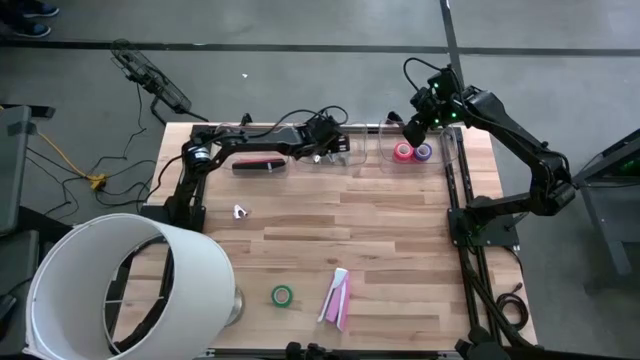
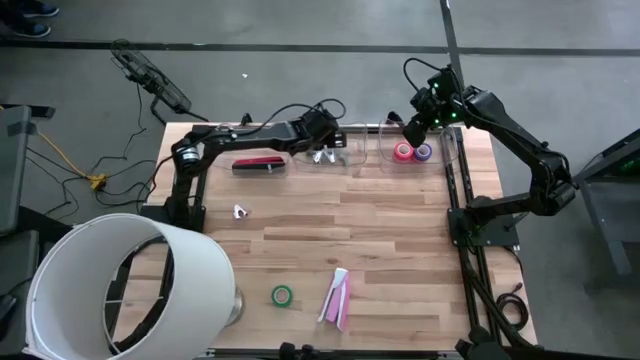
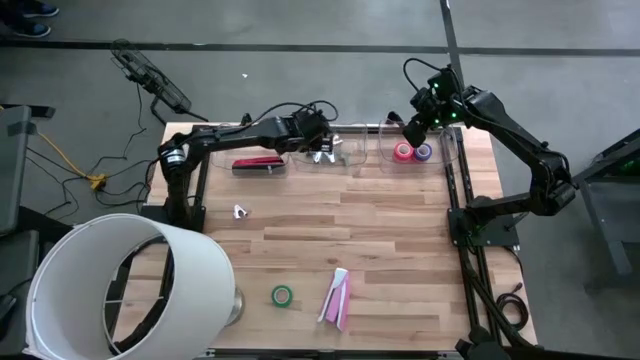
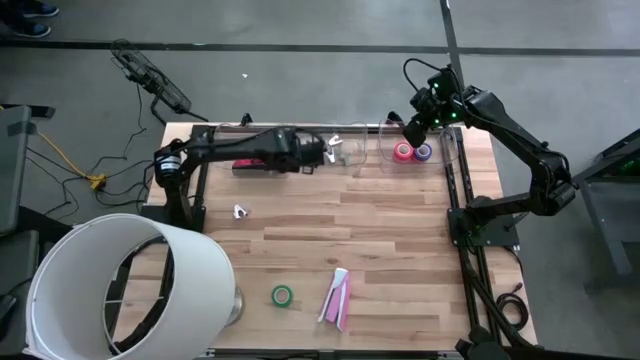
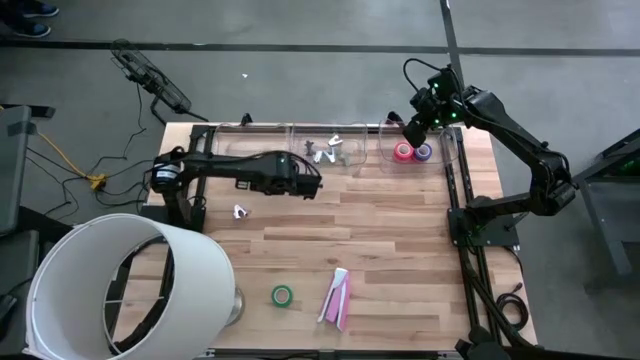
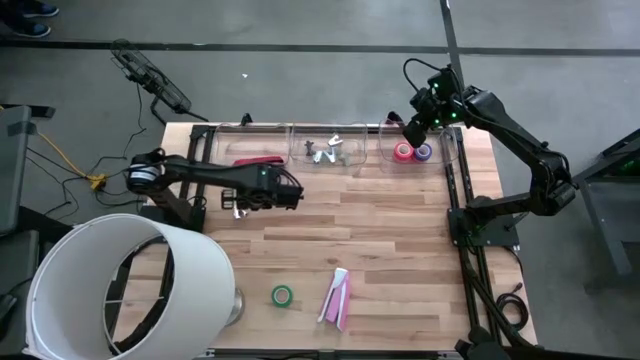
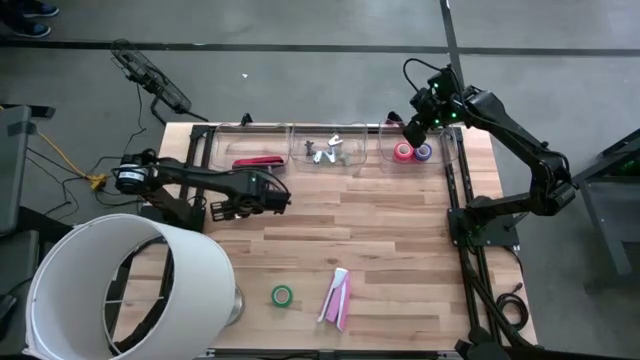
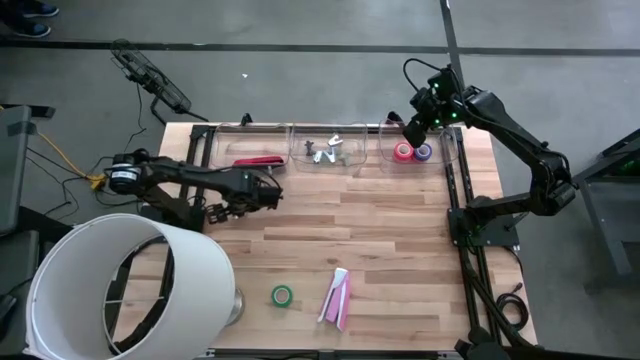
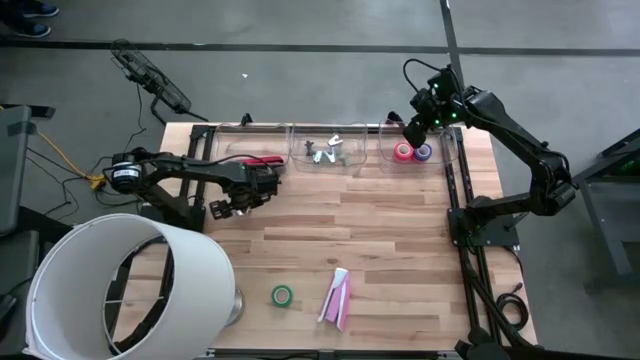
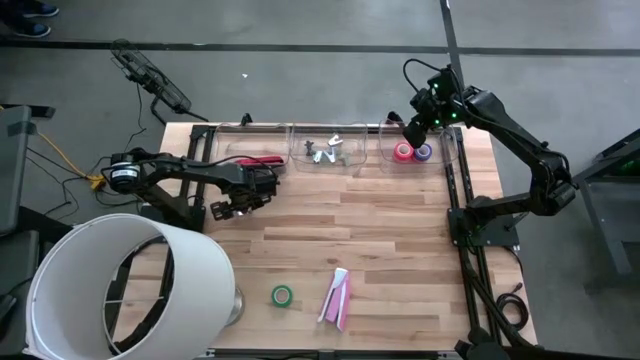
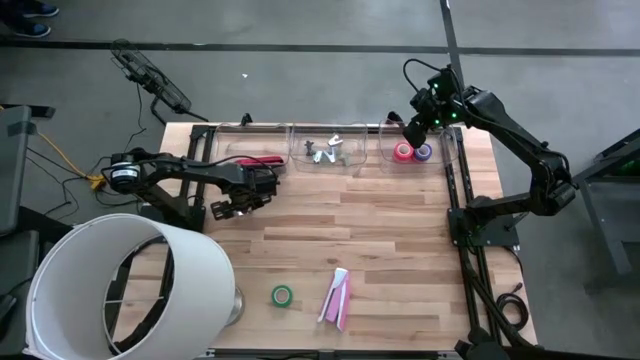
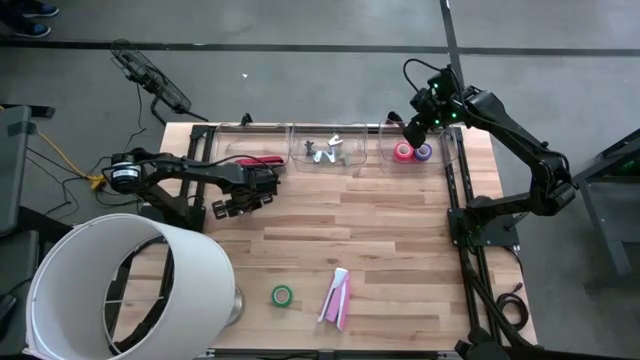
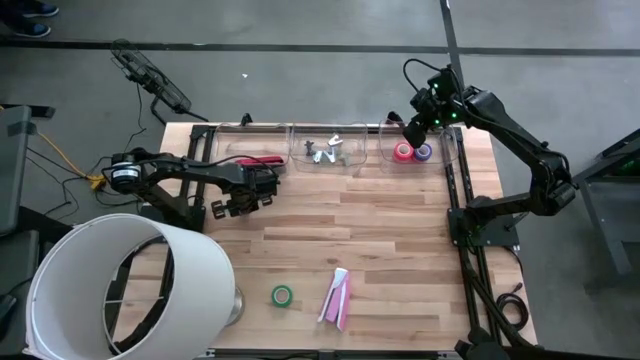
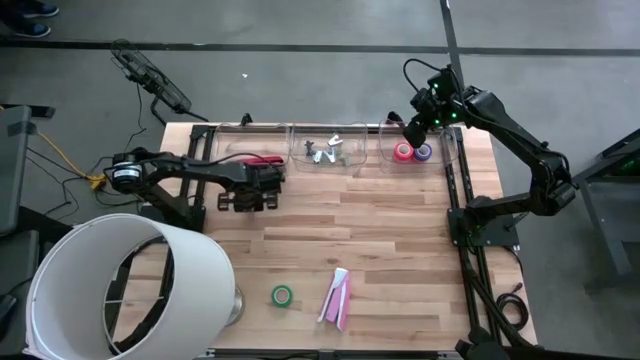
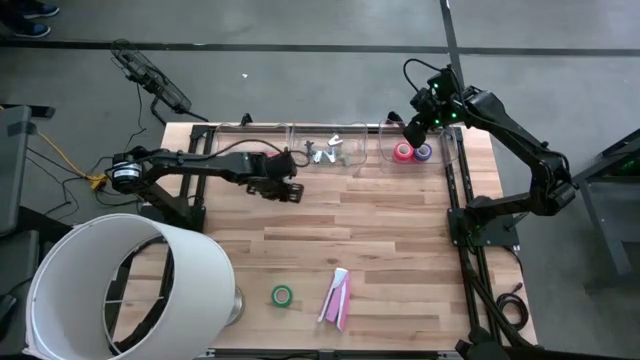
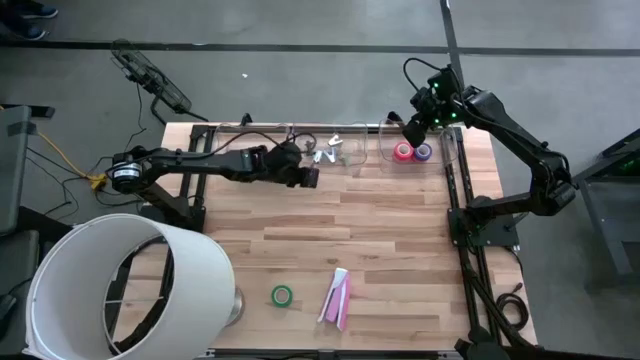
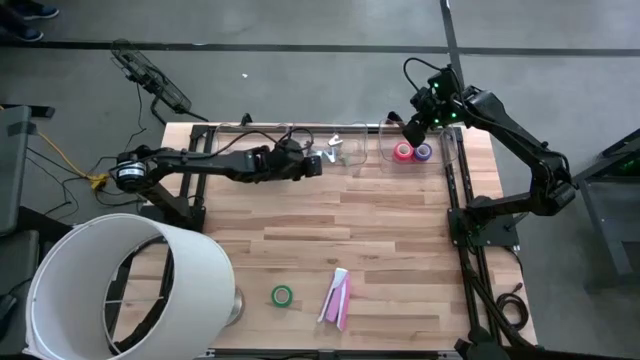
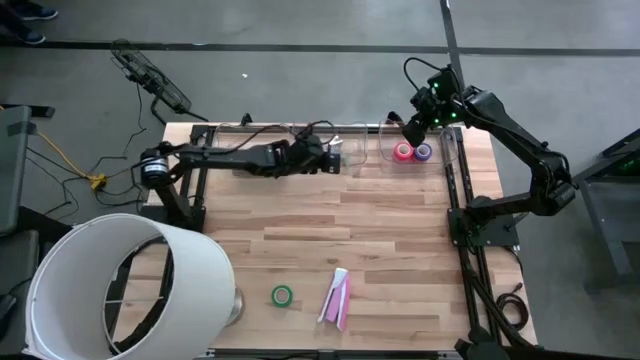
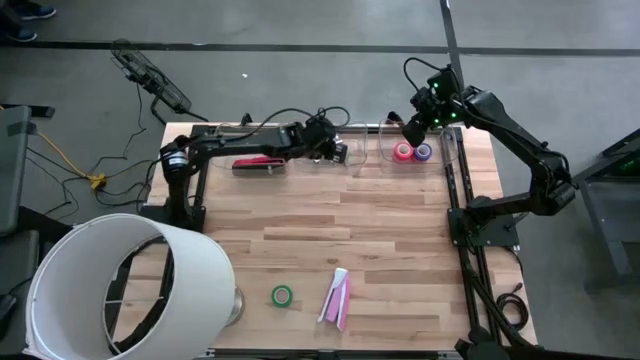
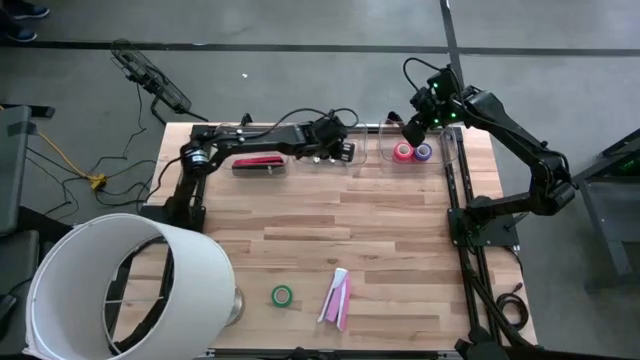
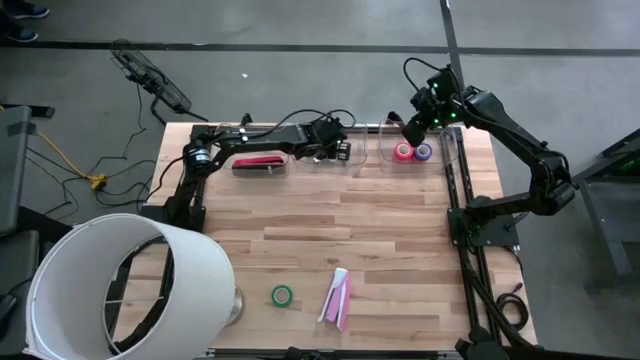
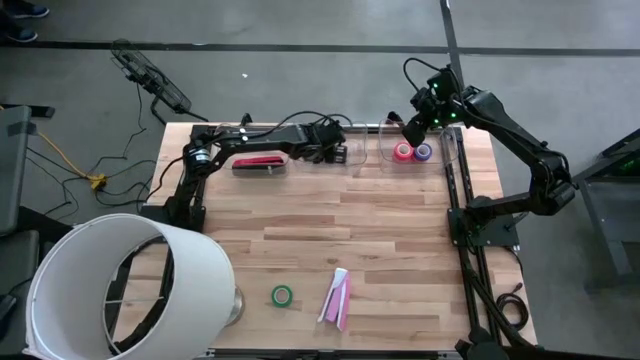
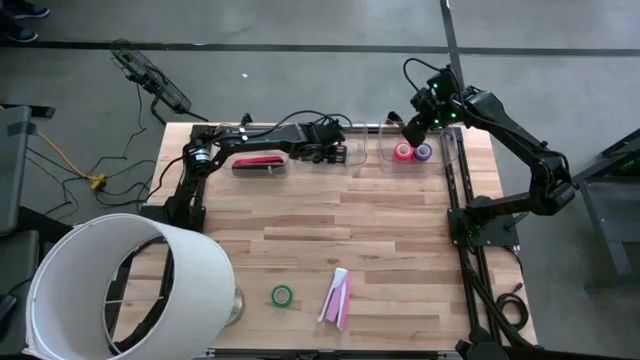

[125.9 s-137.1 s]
Task: Pick and place Stapler, Stapler remover, tape
Put the violet stapler remover into the middle transparent bin

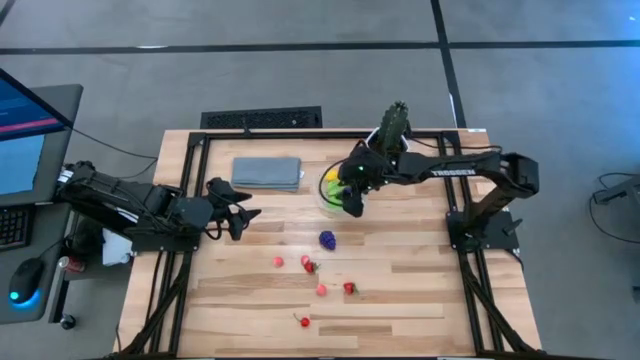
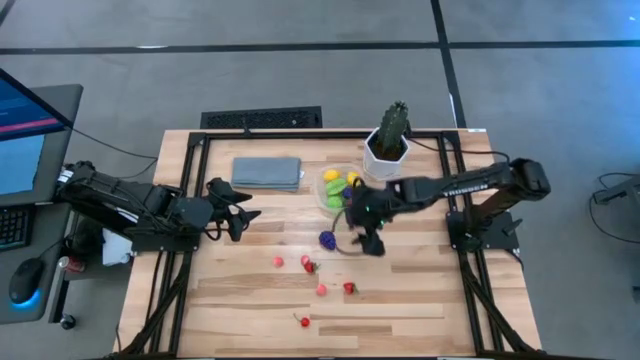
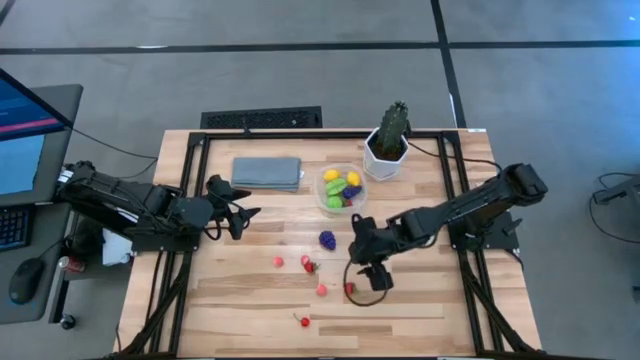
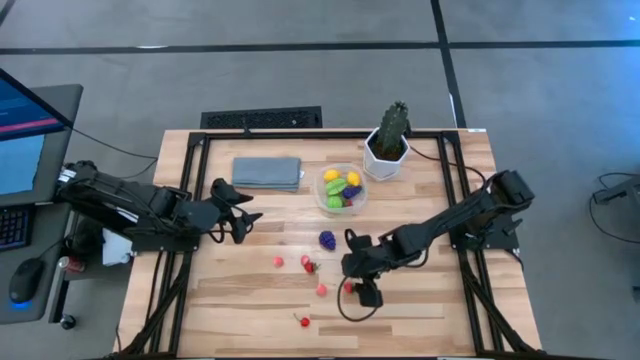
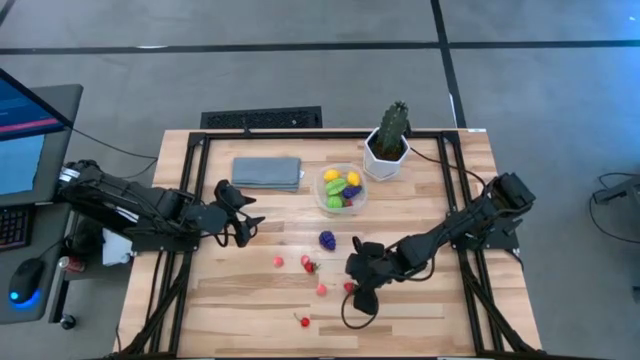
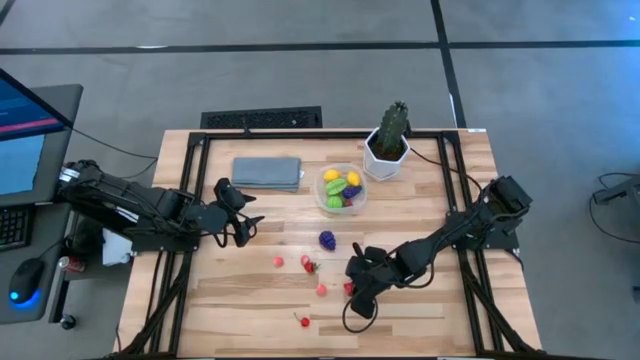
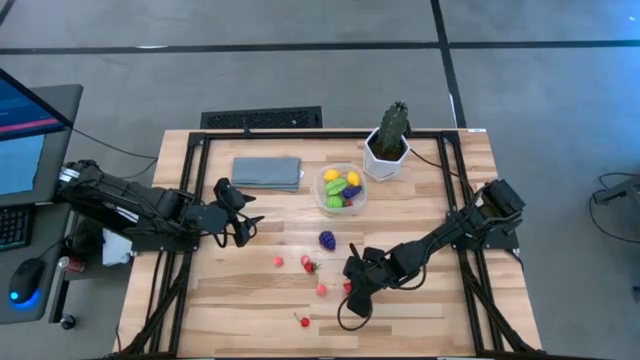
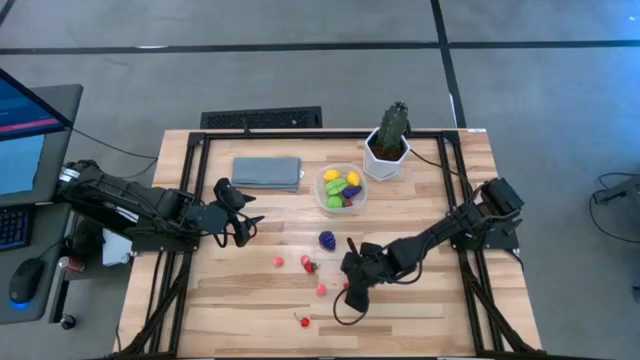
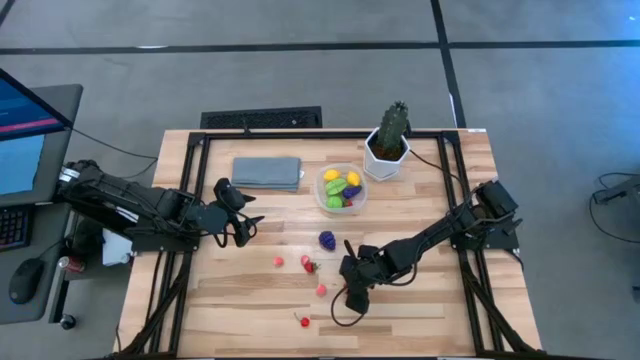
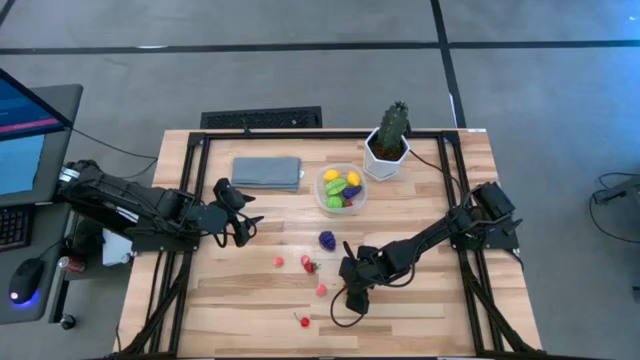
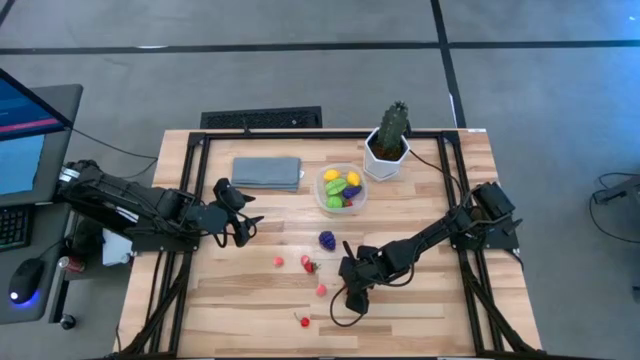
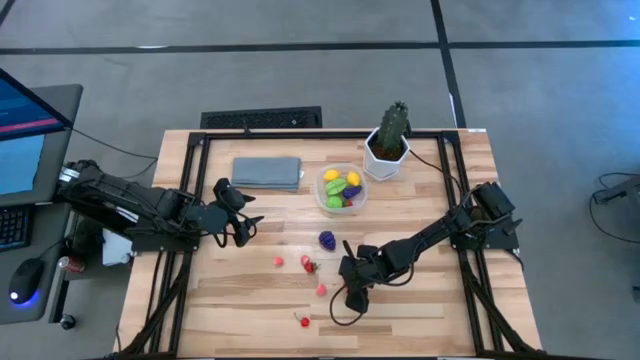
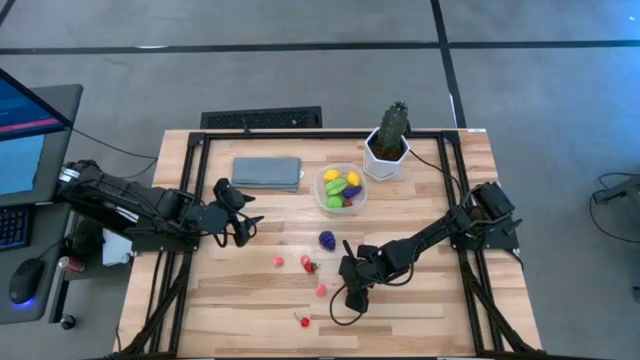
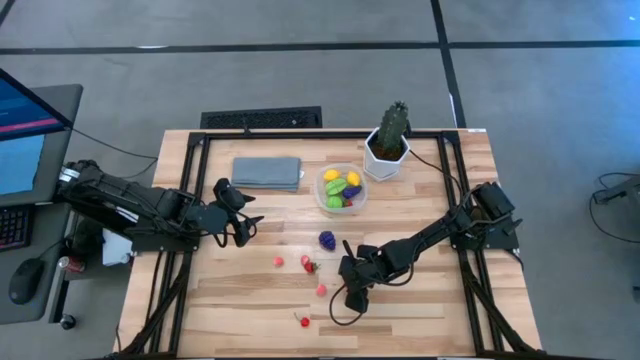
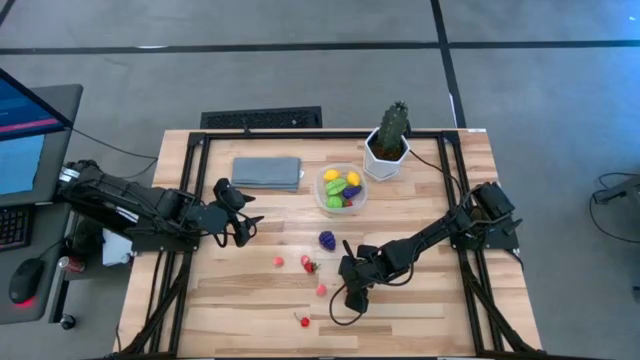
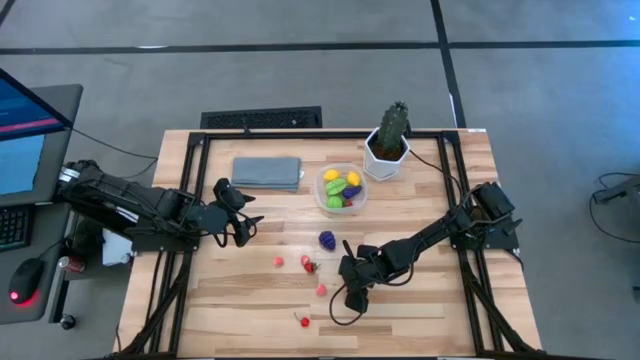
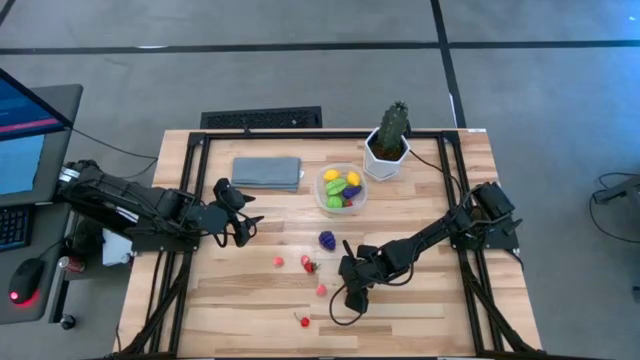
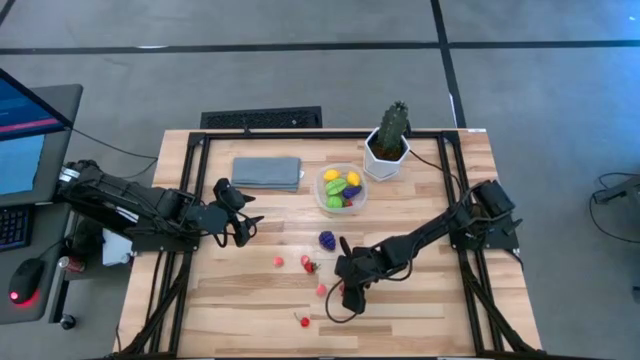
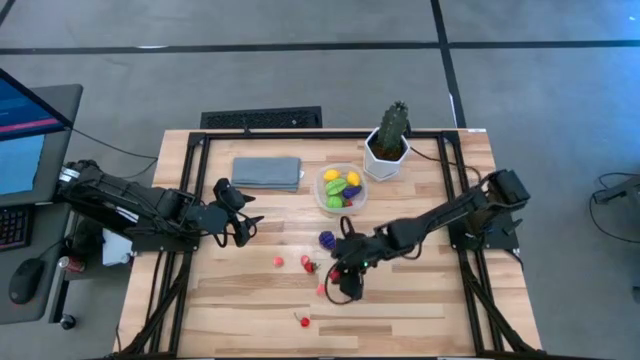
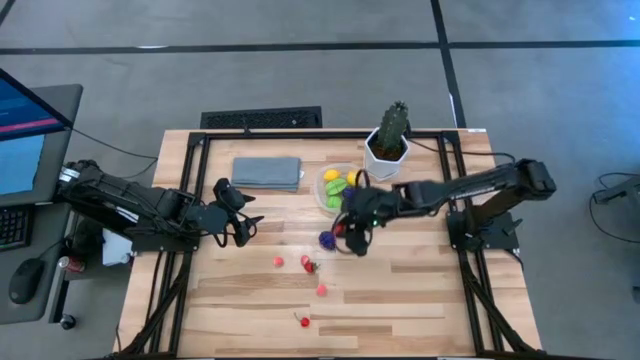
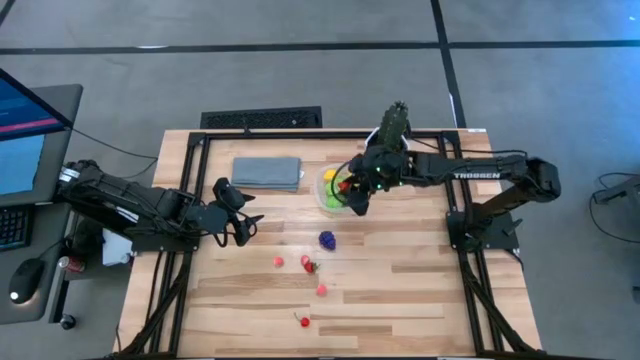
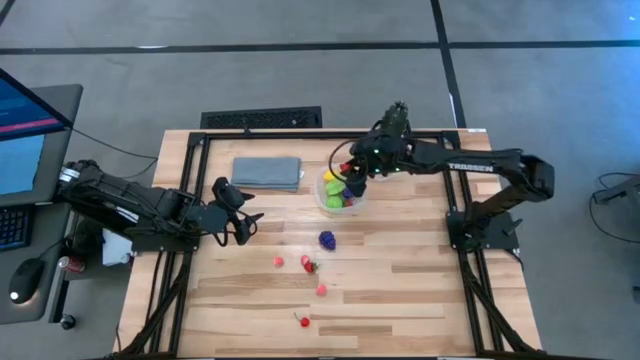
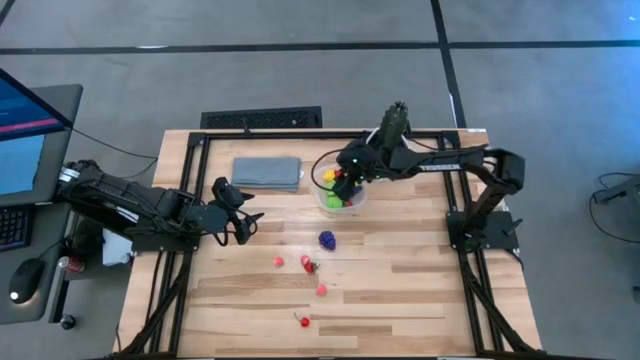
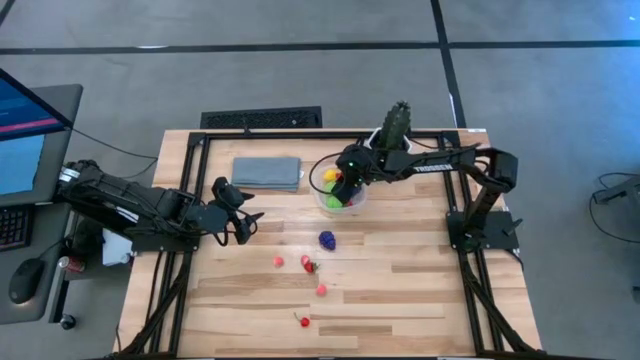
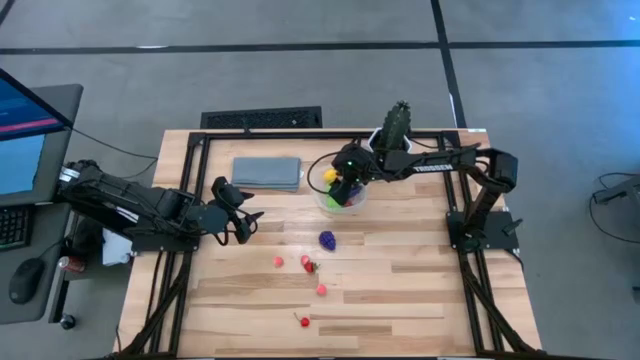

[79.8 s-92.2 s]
Task: Pick and placing Produce into tupperware
Put the right strawberry into the transparent bin
